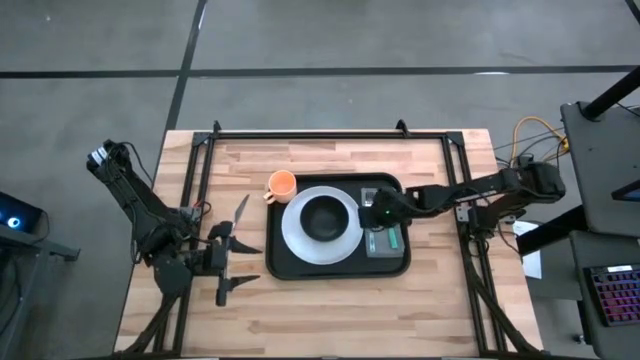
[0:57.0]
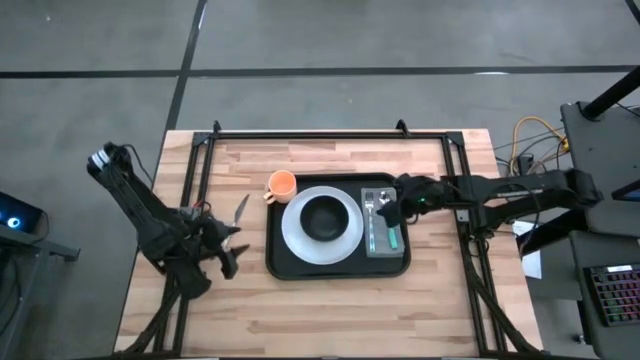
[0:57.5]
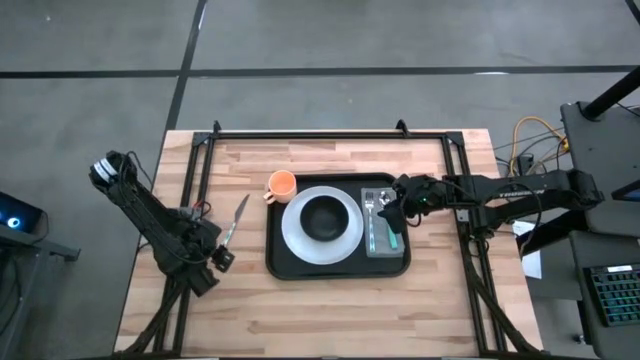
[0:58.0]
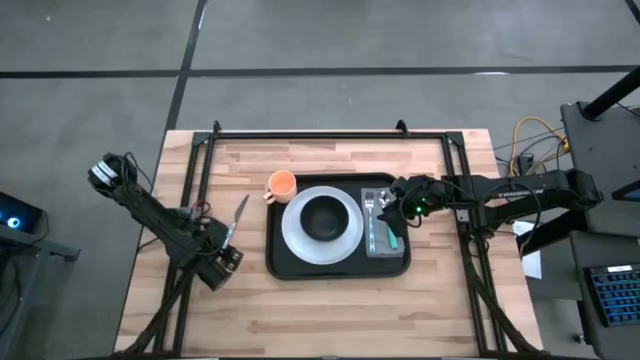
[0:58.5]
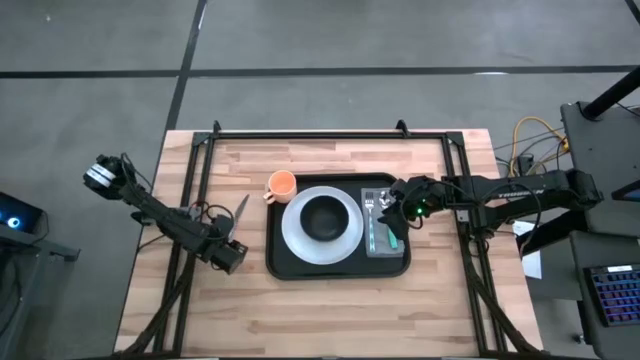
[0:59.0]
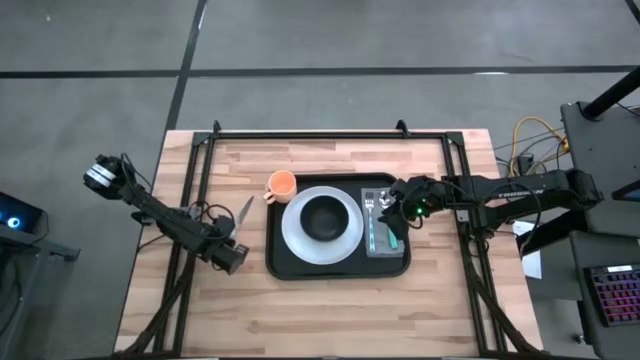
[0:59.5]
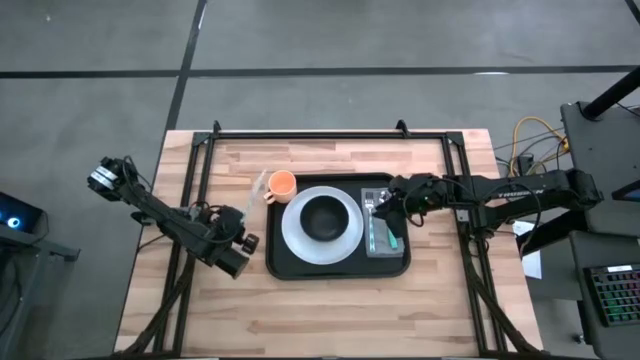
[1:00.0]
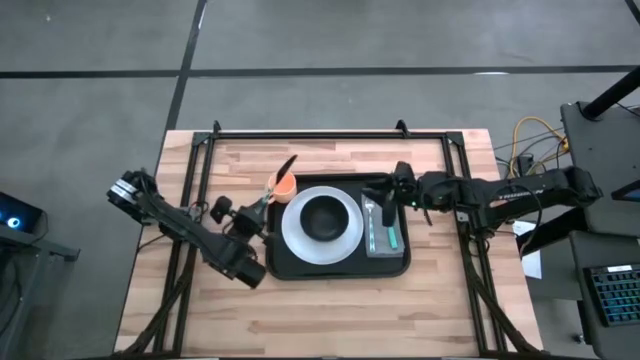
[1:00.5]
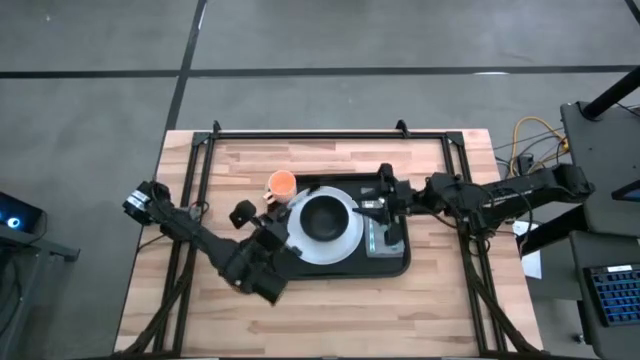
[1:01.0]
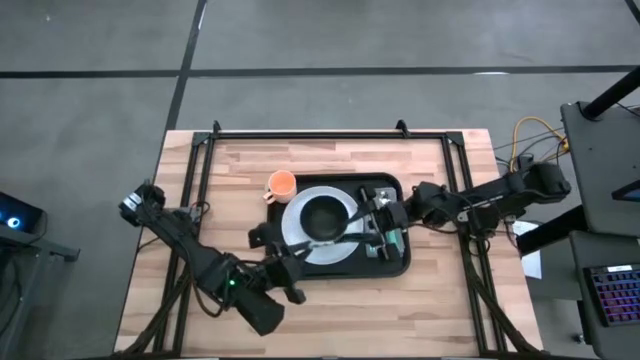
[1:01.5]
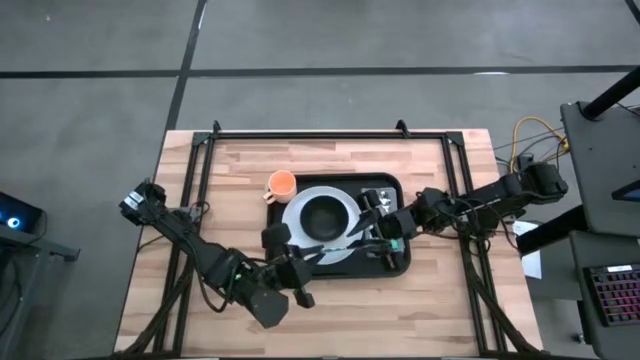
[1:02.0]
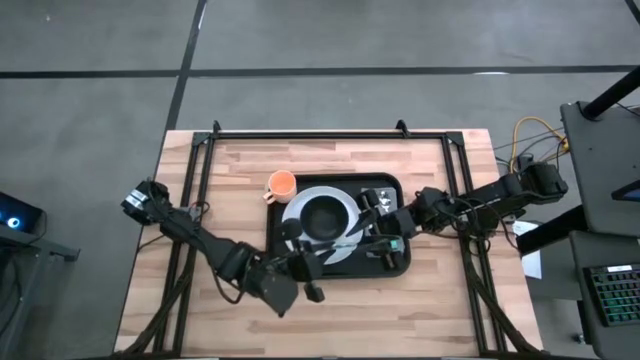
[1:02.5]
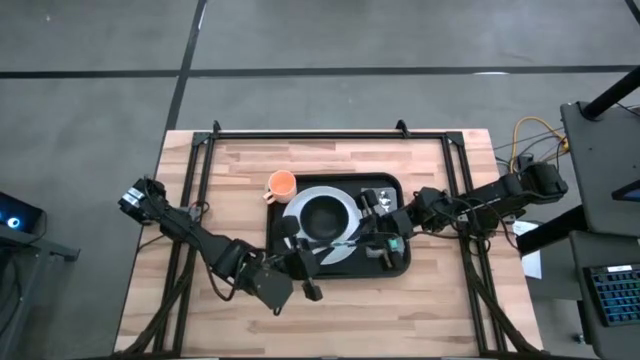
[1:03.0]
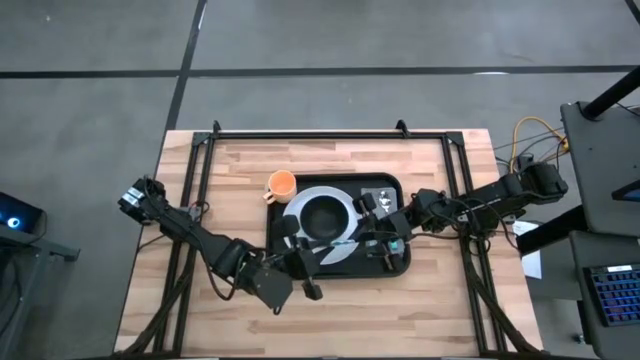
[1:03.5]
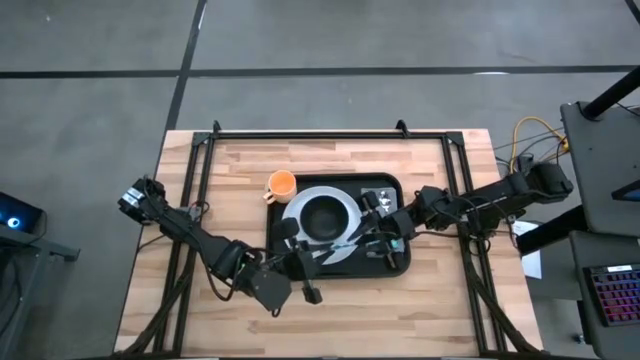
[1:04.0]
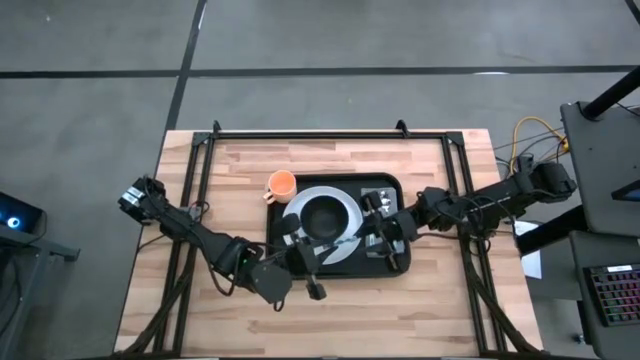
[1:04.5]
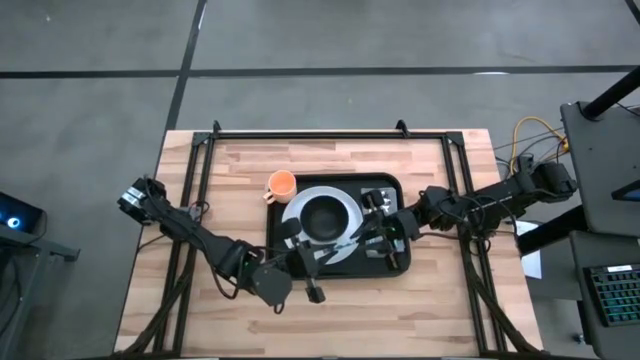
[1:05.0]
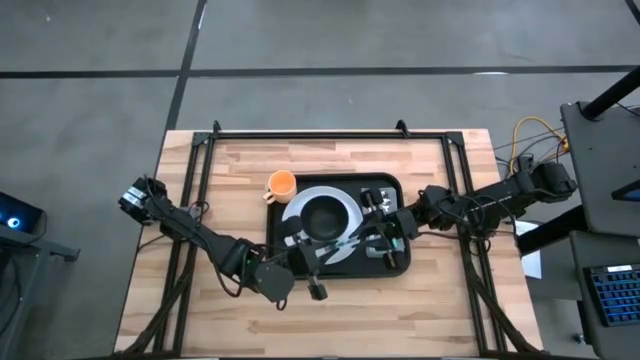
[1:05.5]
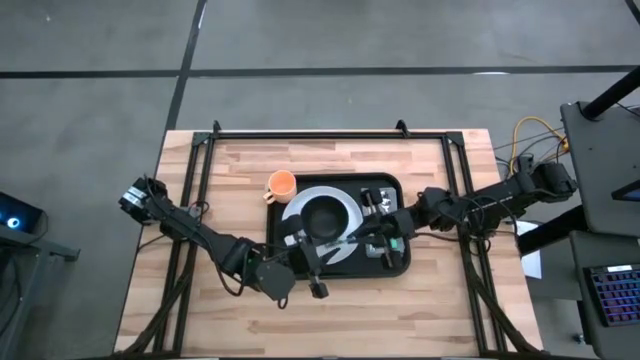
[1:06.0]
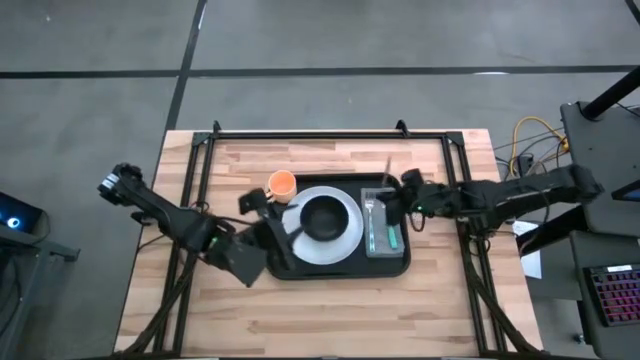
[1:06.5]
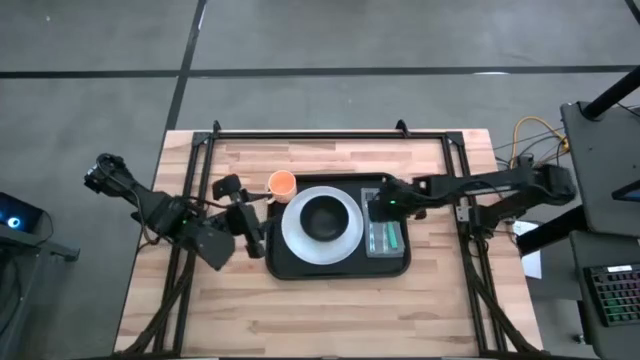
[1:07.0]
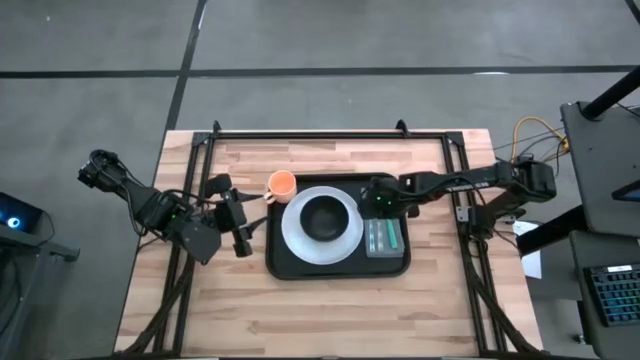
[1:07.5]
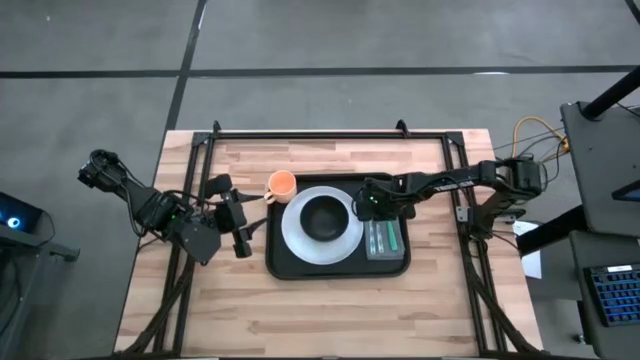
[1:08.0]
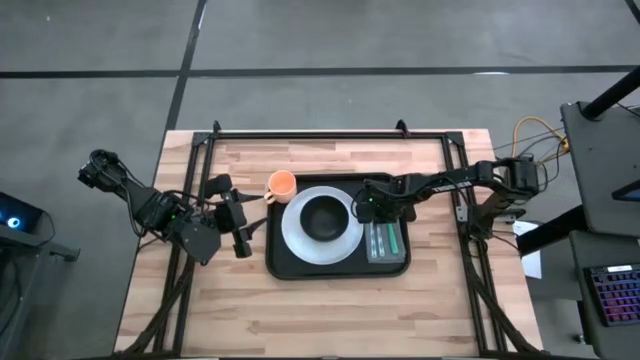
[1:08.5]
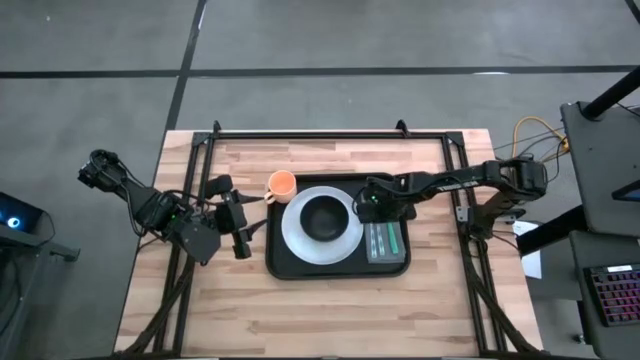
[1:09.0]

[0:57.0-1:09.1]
Task: Set up tray
Put the green knife on top of the grey napkin on the black serving tray to the left side of the green spoon

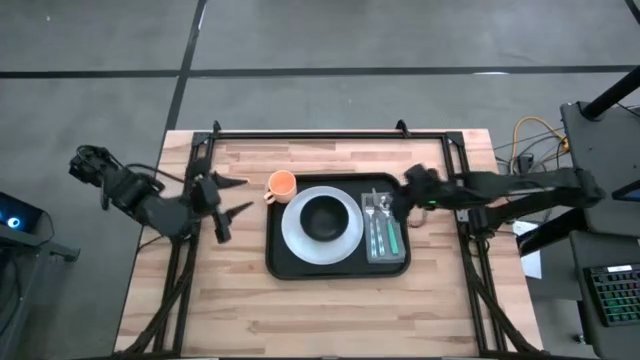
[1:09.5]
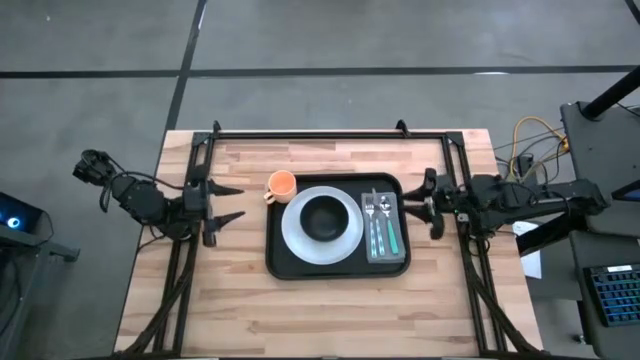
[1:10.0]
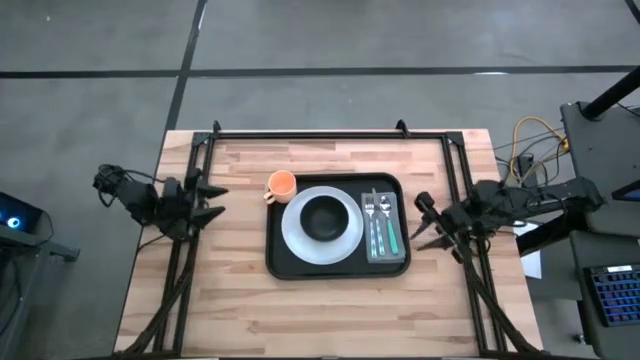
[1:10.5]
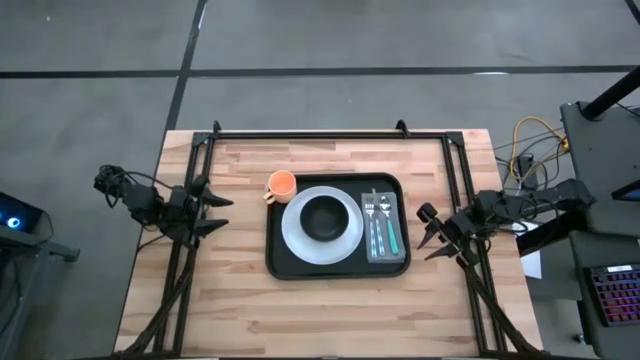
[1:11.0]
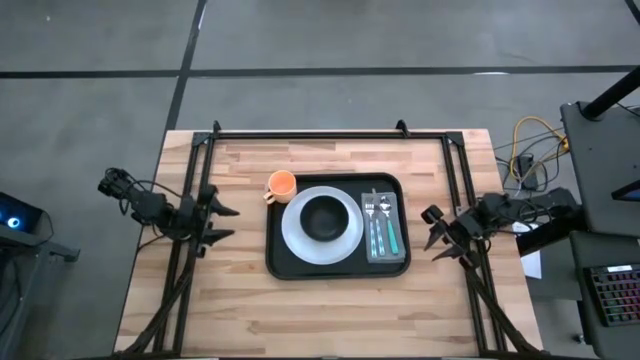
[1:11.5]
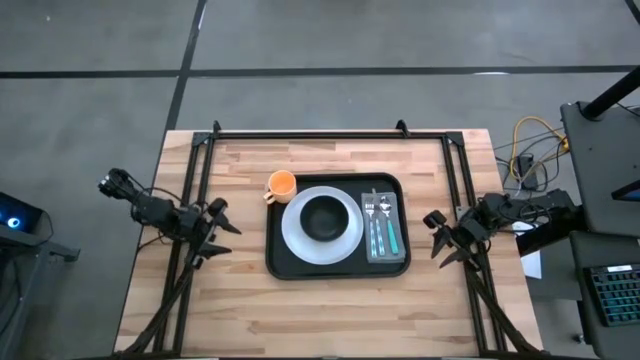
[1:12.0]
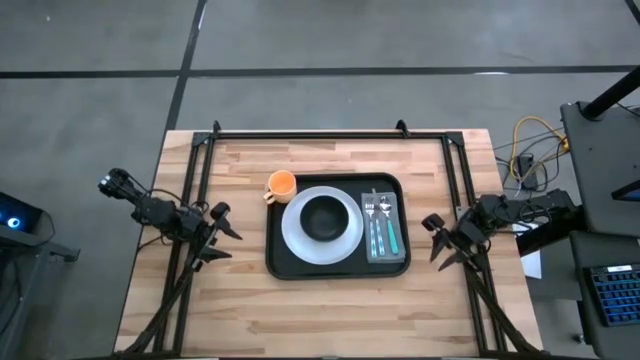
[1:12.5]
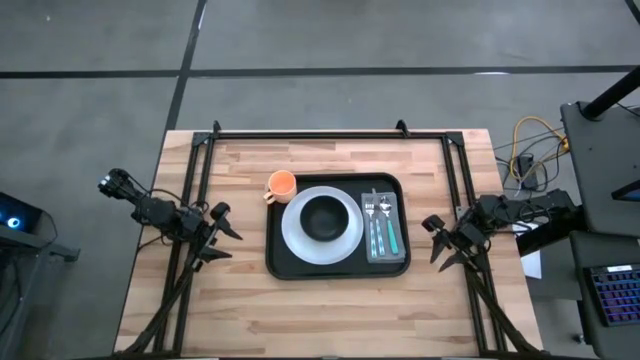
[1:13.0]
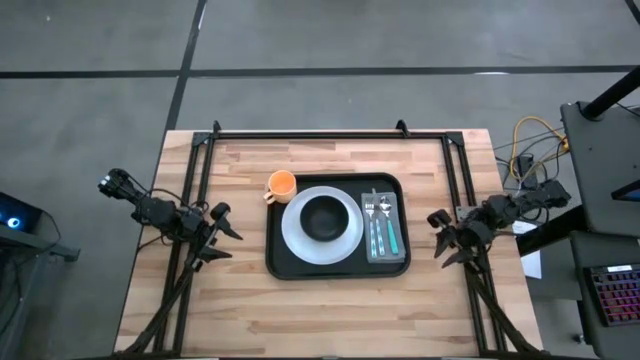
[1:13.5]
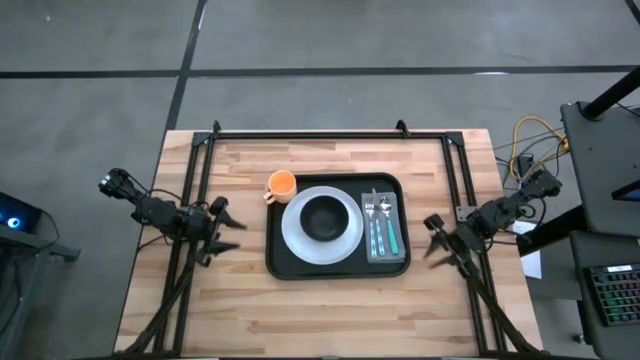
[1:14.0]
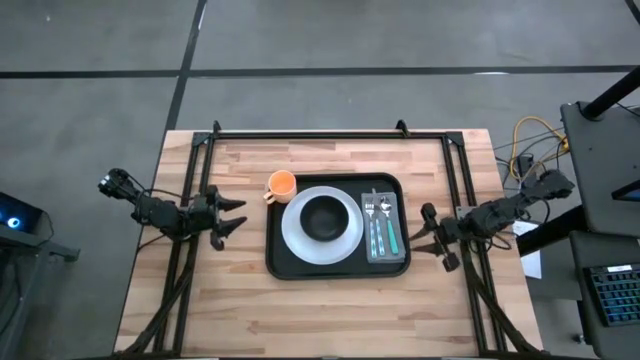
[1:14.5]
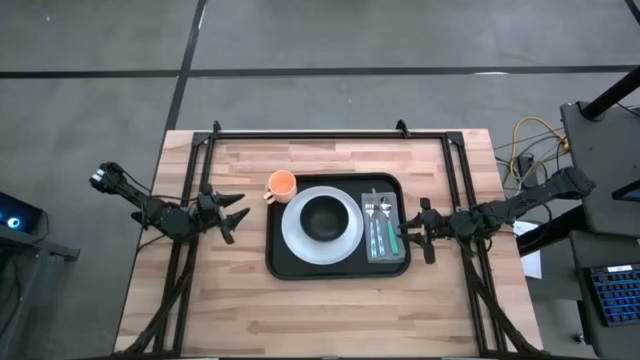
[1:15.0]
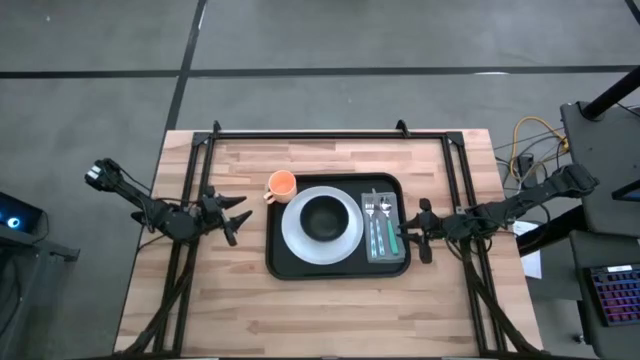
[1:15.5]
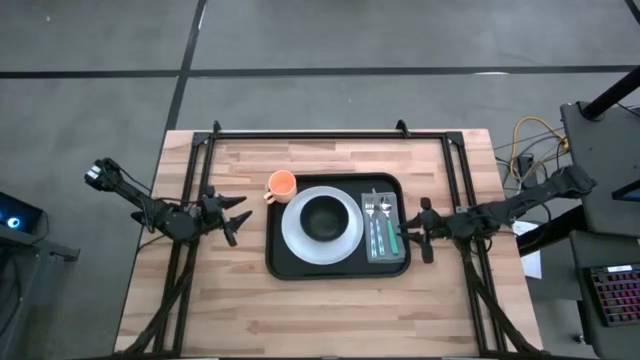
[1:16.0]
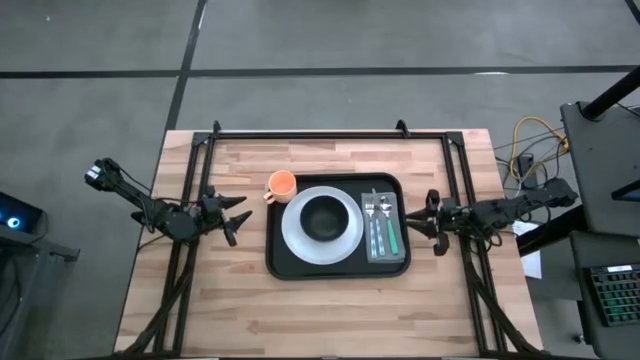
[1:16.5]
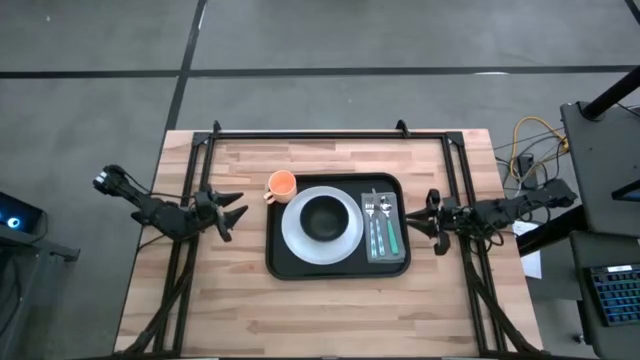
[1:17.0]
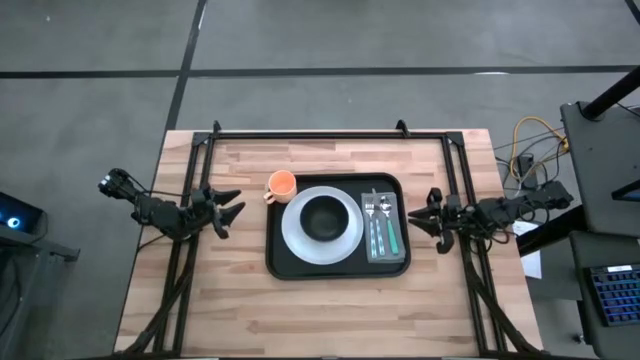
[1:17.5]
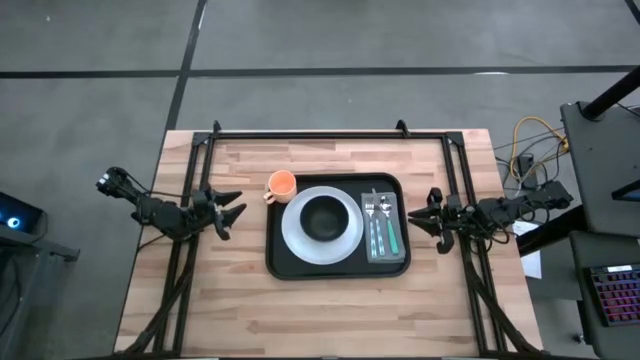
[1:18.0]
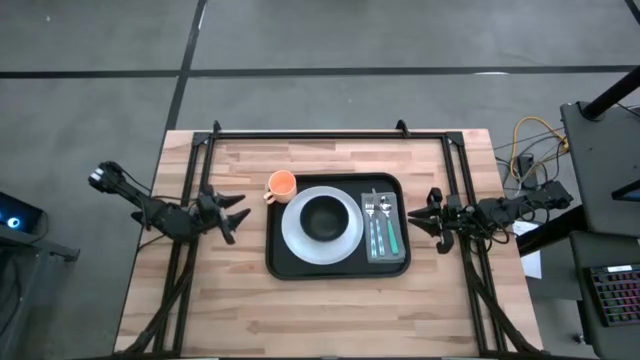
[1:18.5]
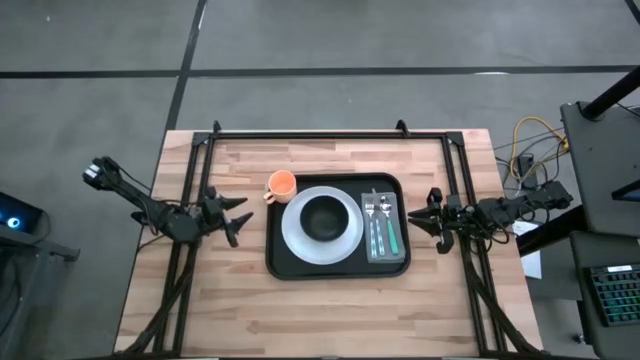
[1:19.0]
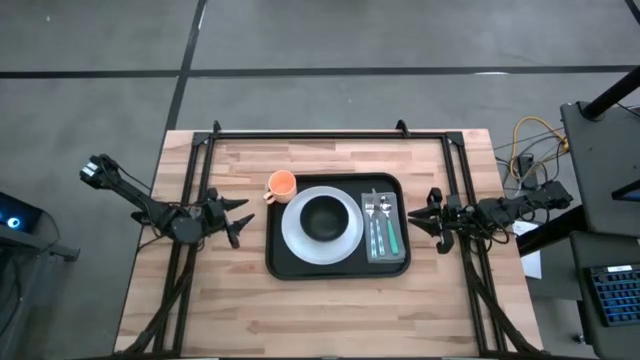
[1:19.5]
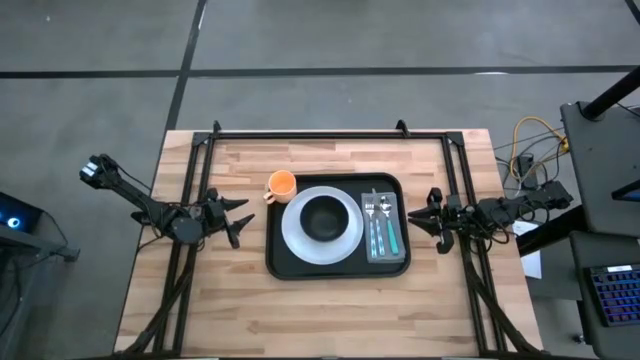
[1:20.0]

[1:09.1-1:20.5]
Return to Home Position
